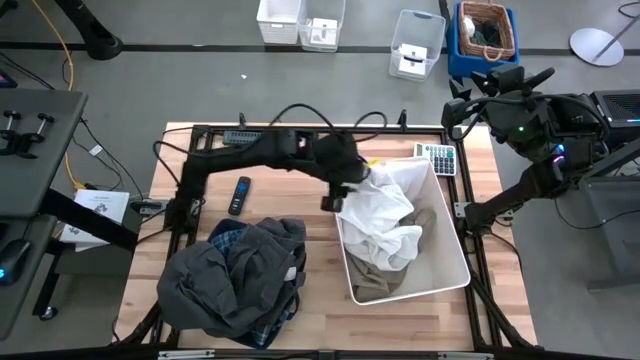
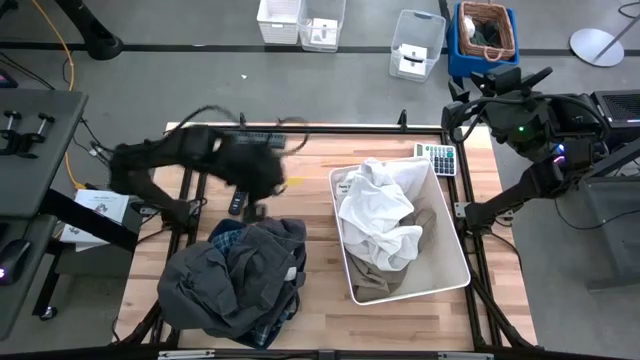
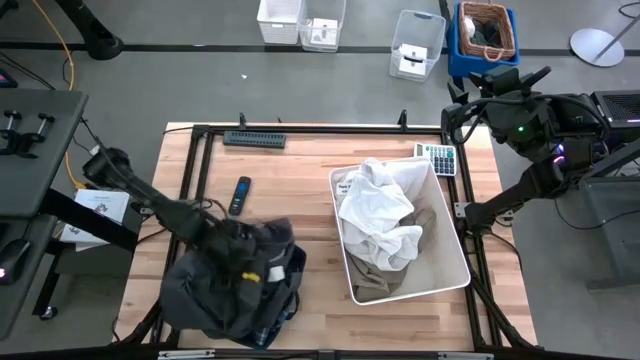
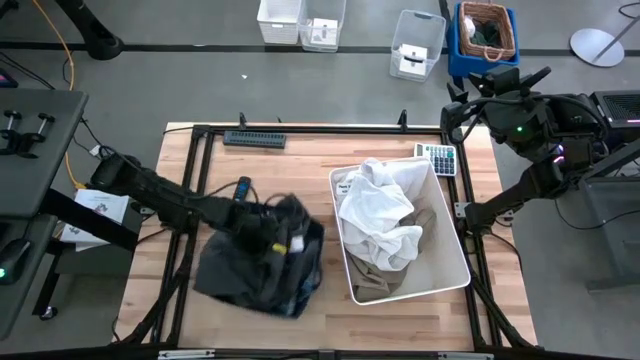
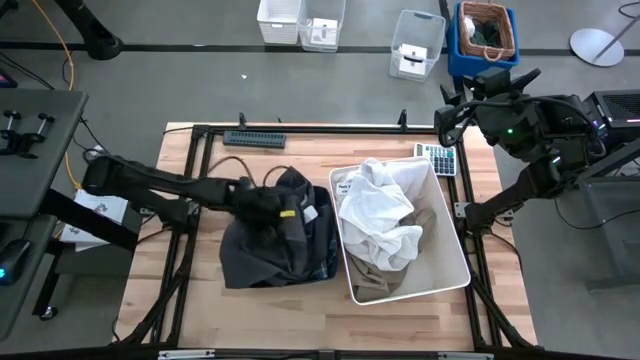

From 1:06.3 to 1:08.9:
Task: Sort clothes
Adjust the blue laundry organizer to the table

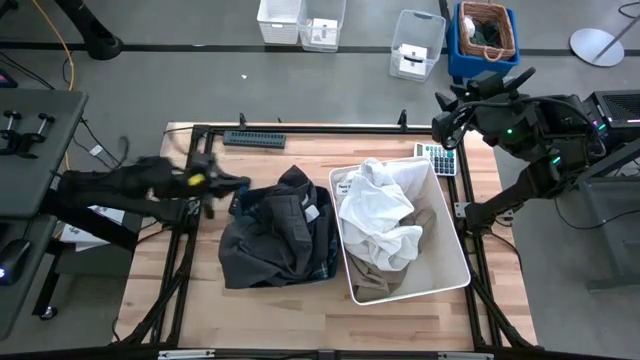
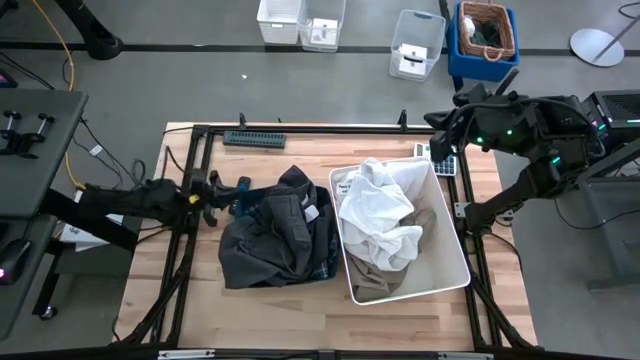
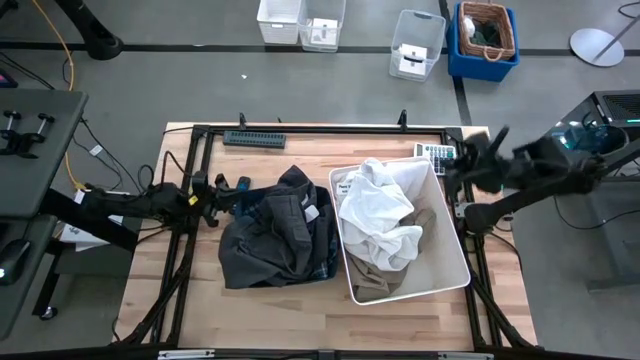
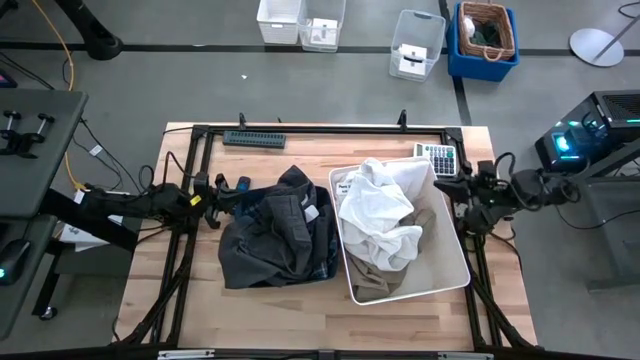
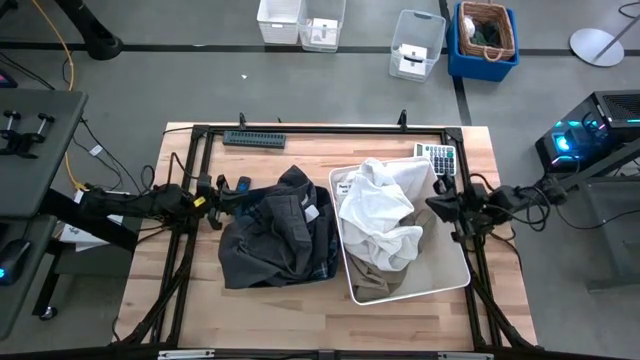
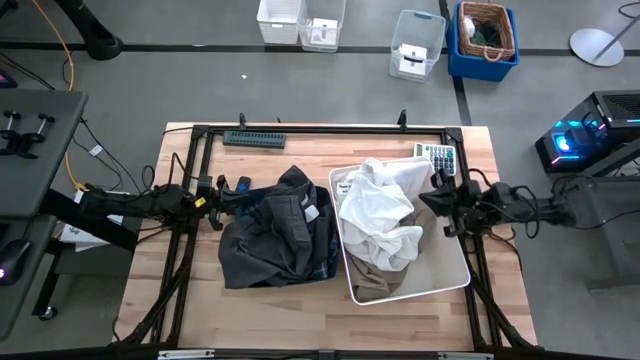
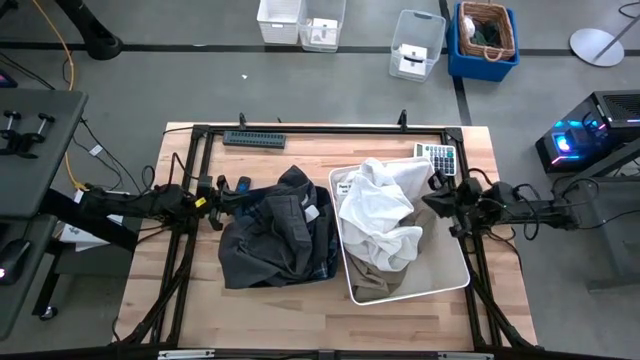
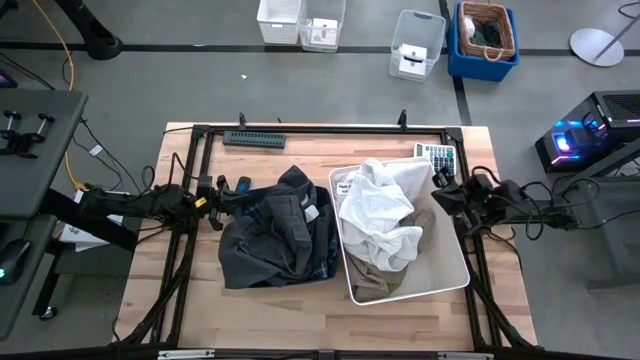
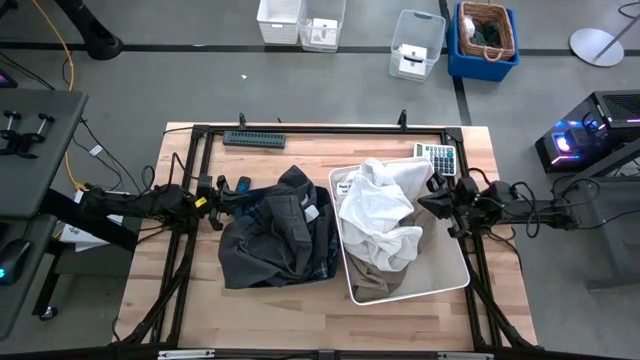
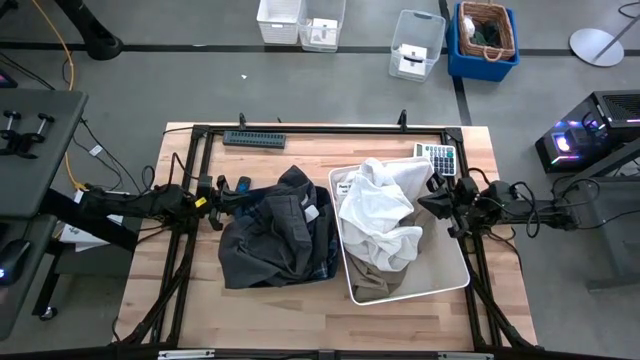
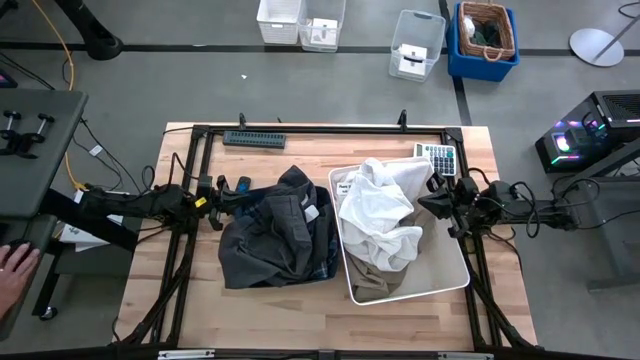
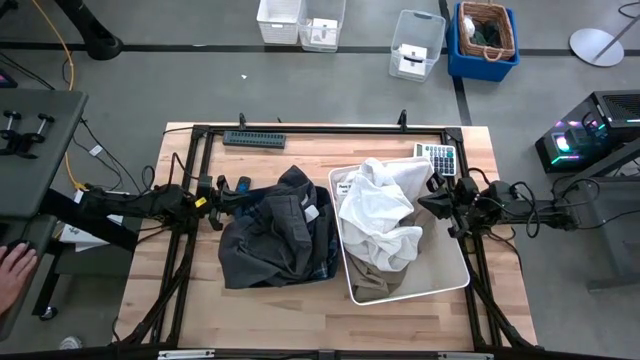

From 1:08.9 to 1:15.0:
Return to Home Position

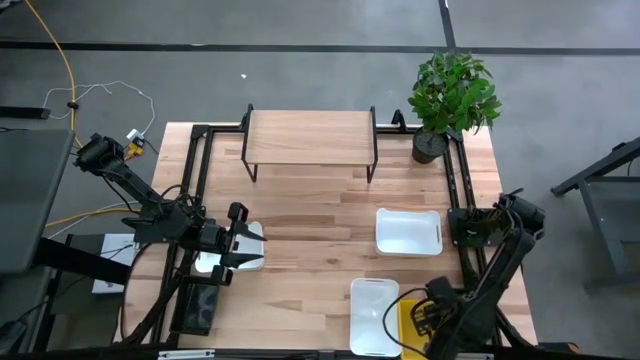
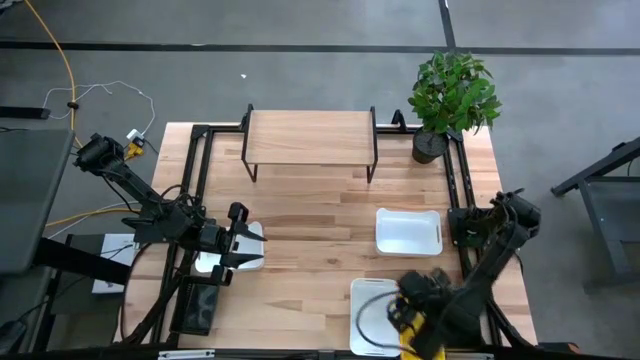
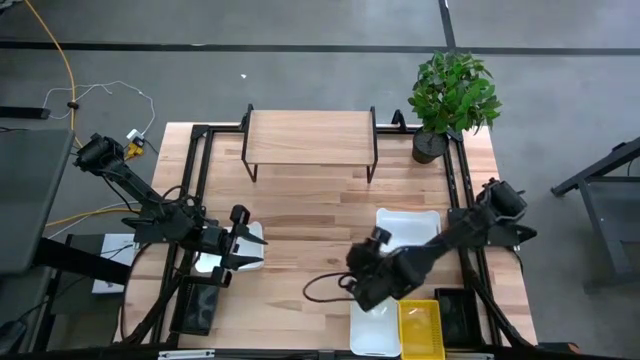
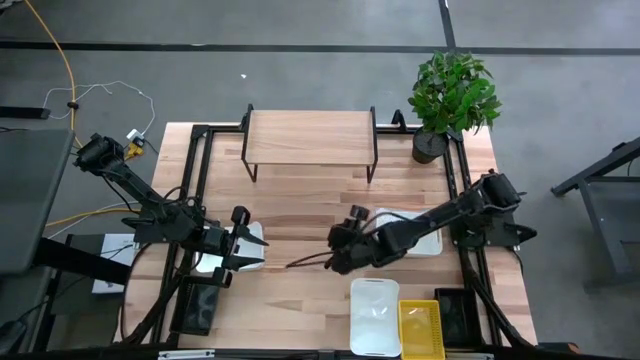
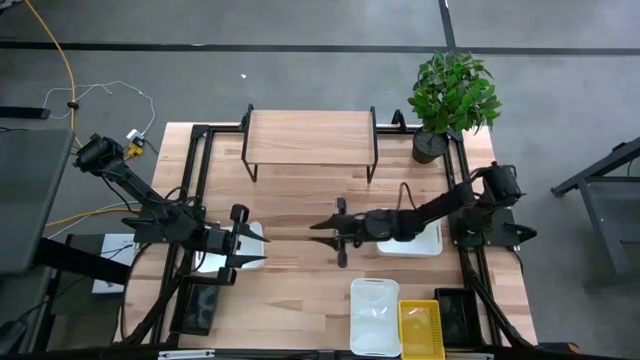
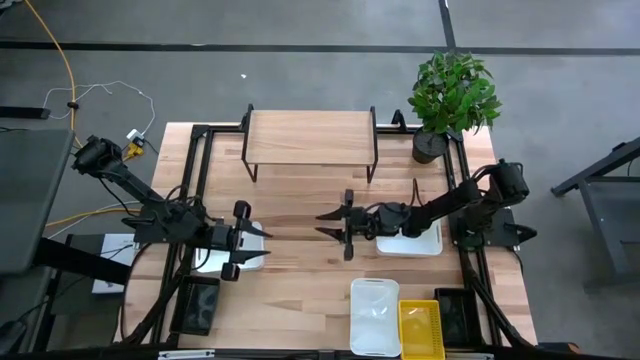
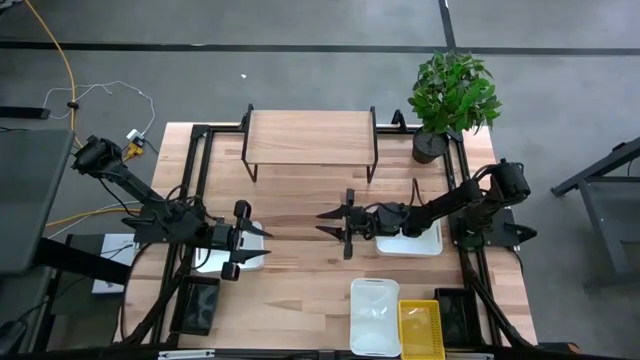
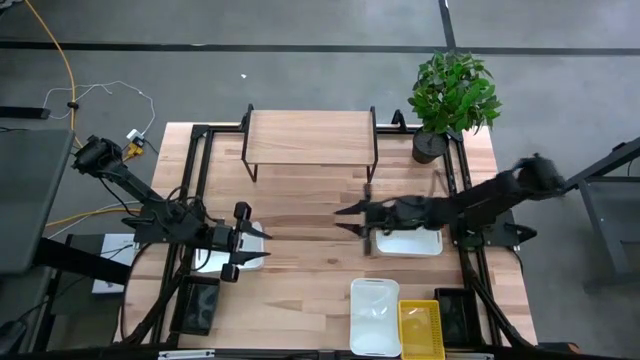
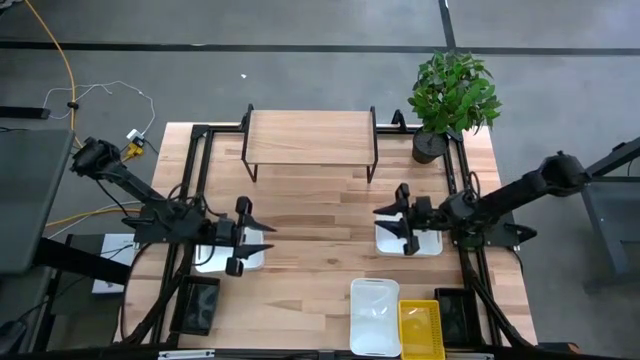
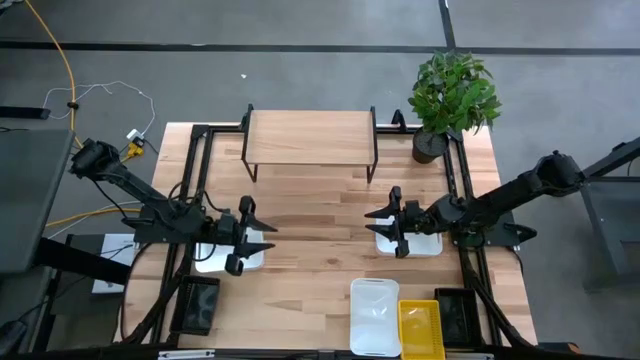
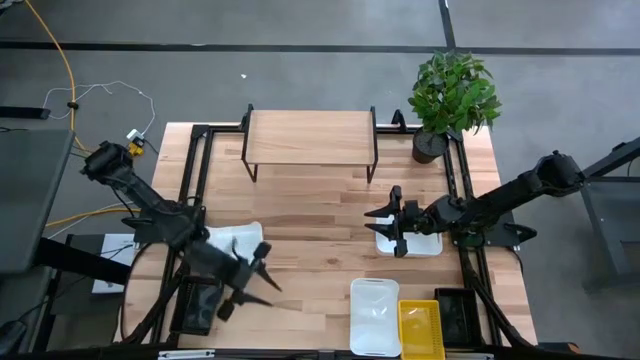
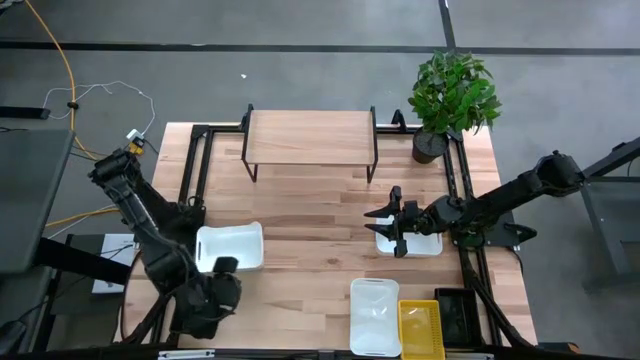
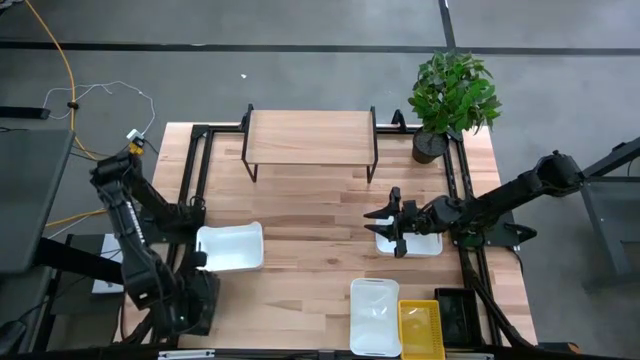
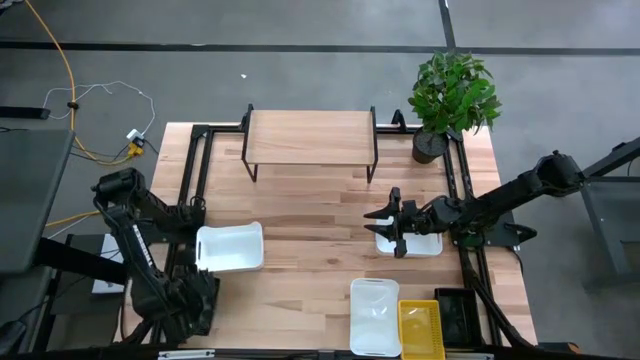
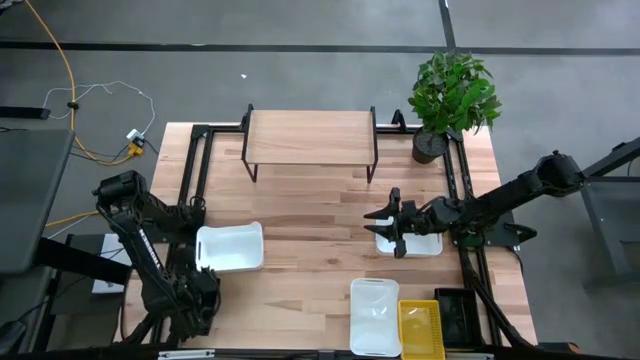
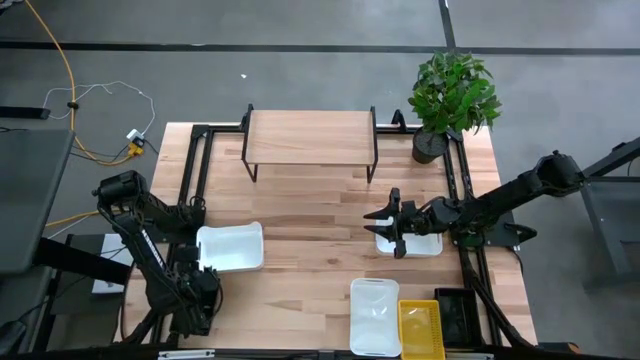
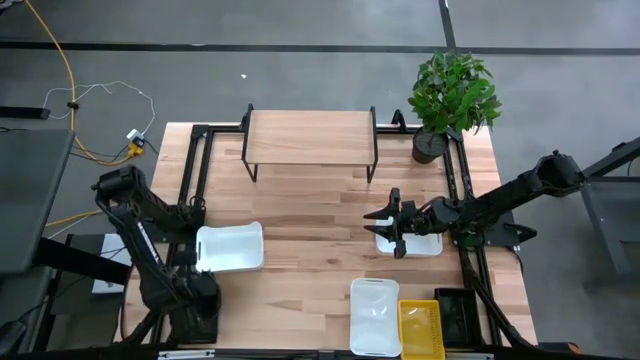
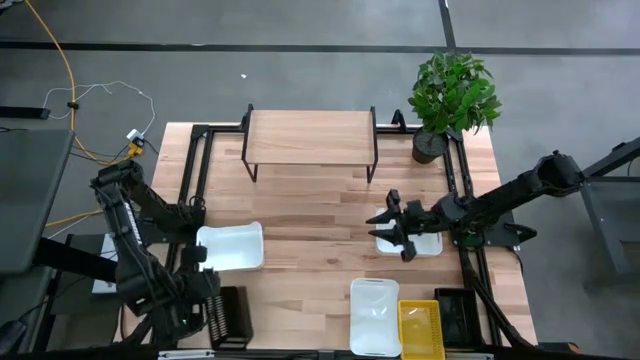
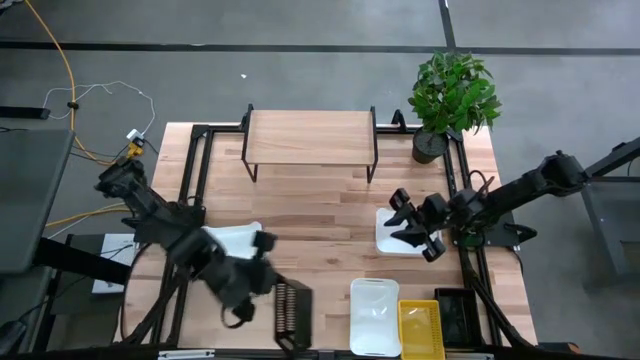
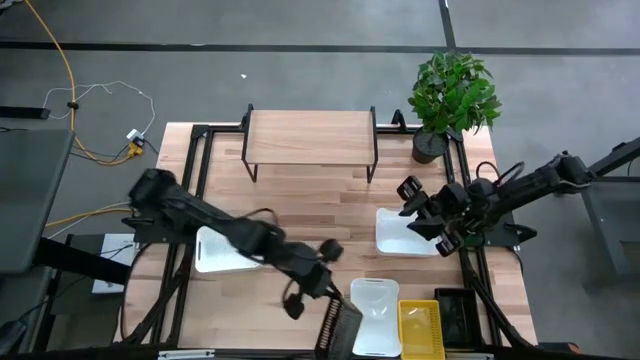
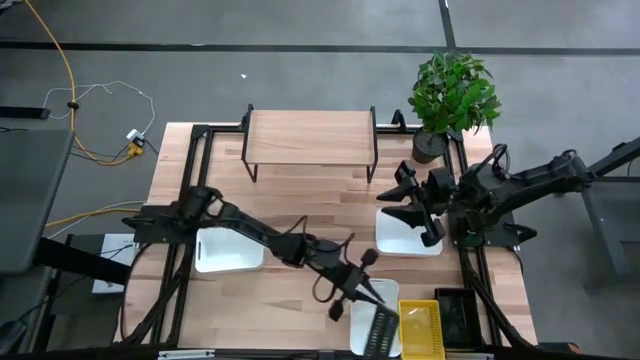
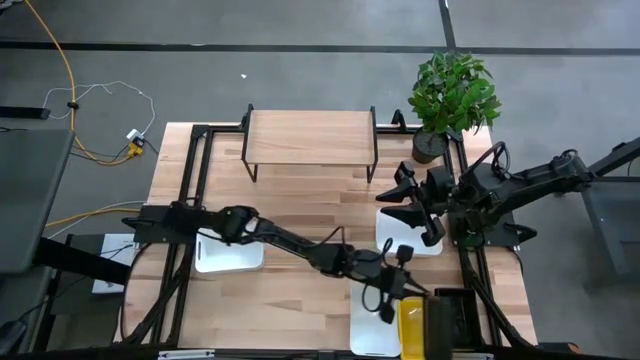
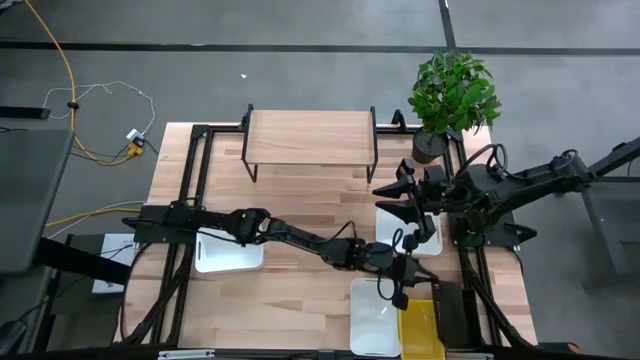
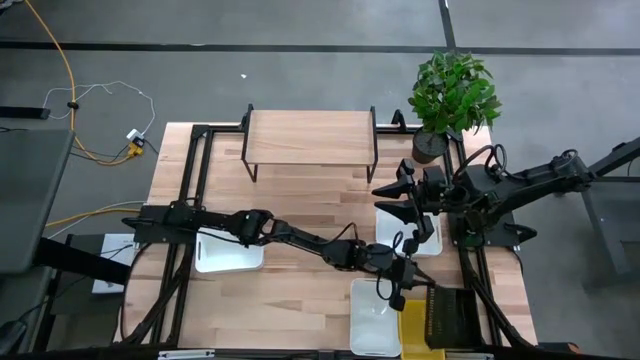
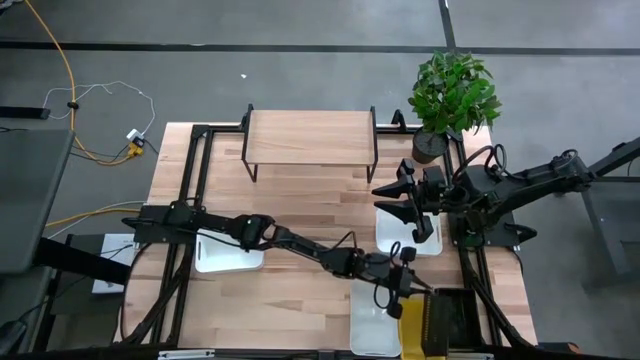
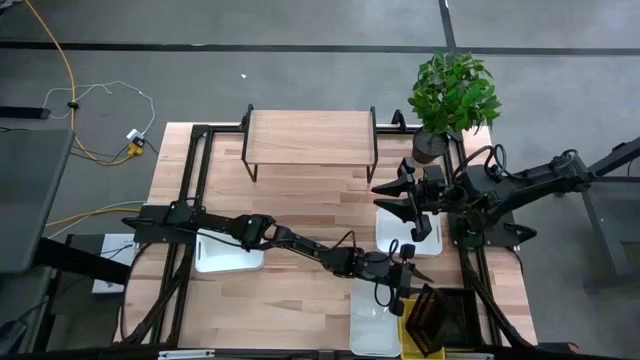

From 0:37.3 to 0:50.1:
Task: Stack baskets on shelf by color
Stack the left black bin on the stacked black bins
